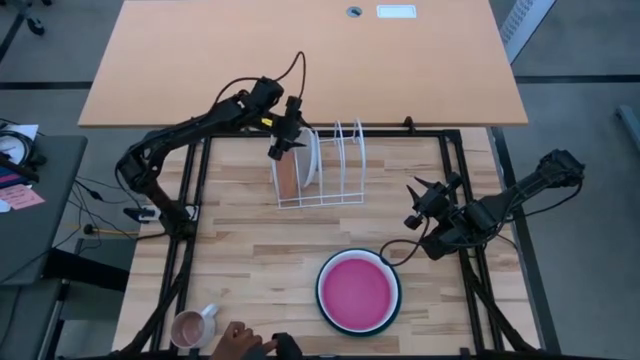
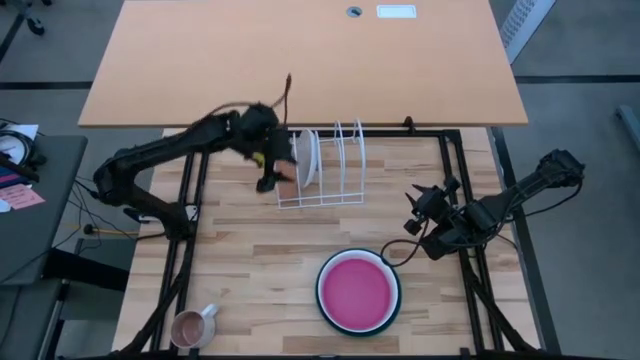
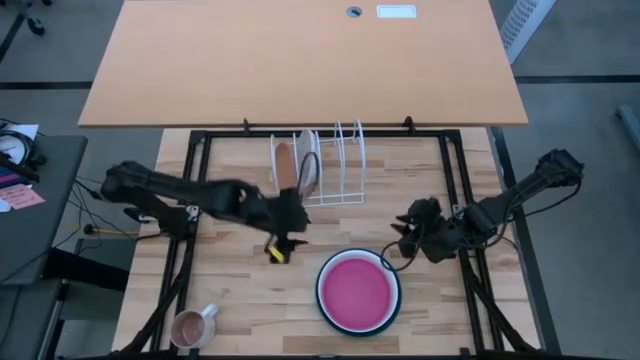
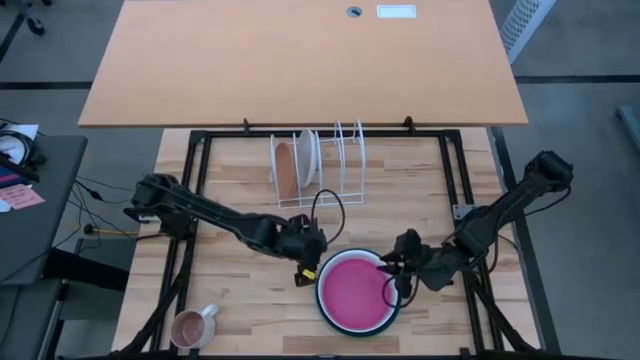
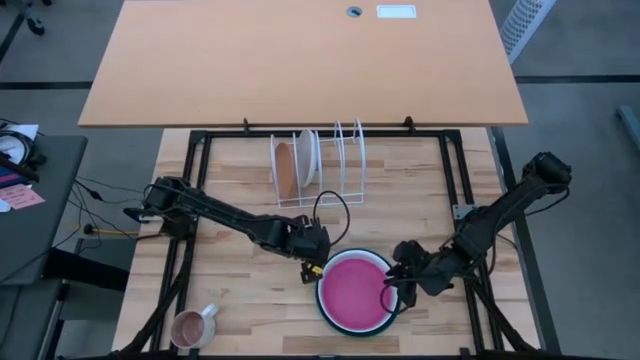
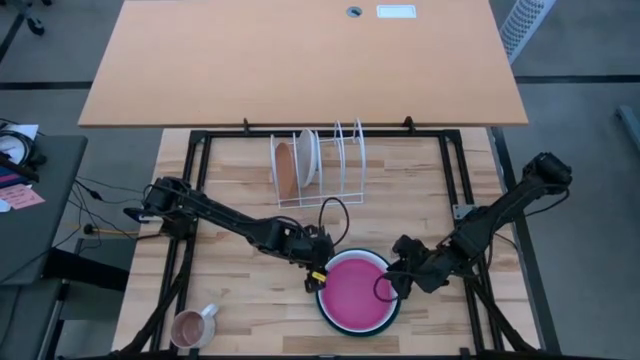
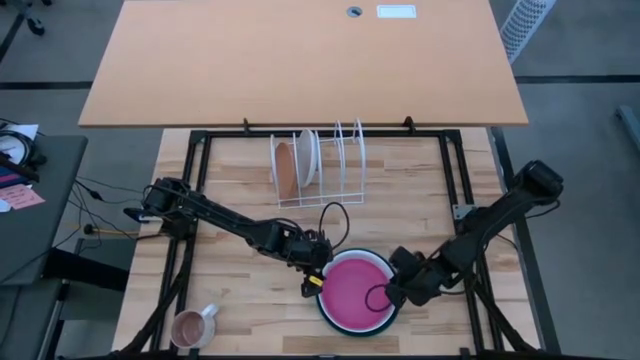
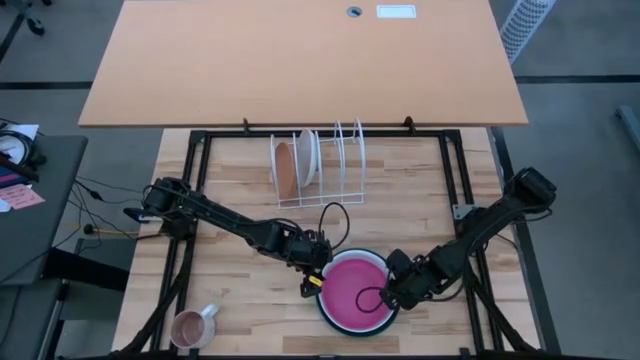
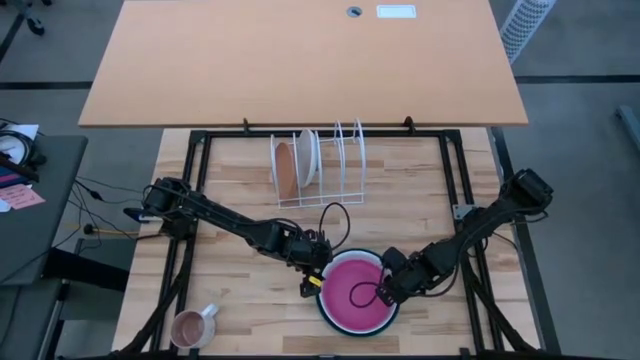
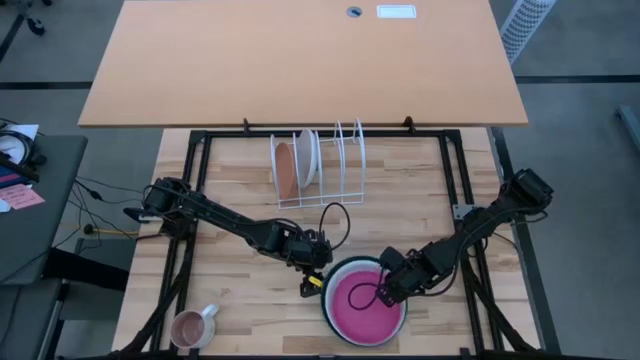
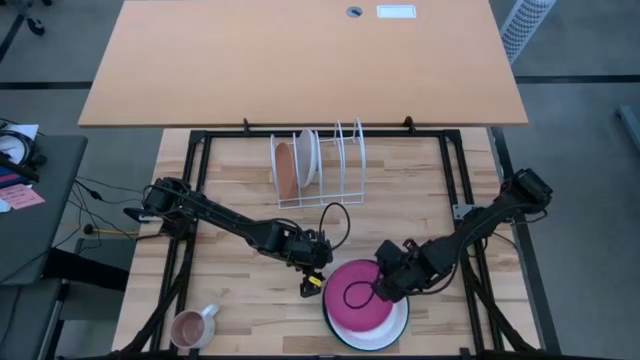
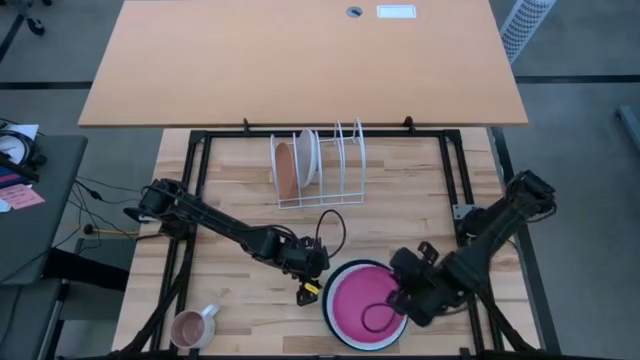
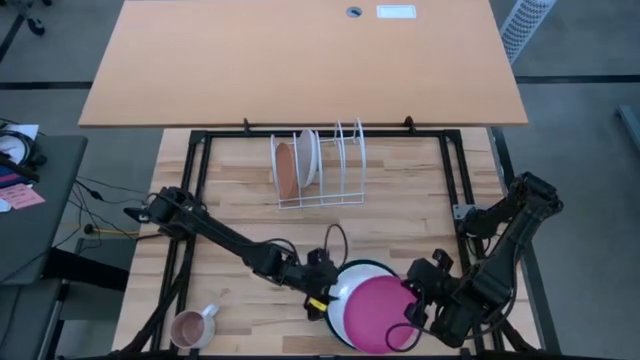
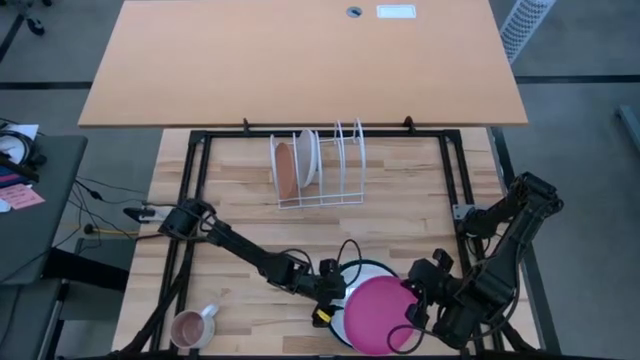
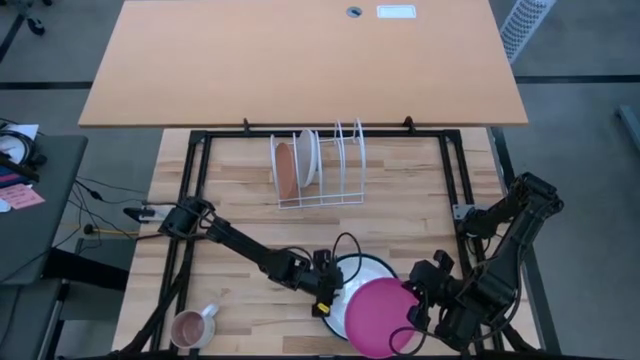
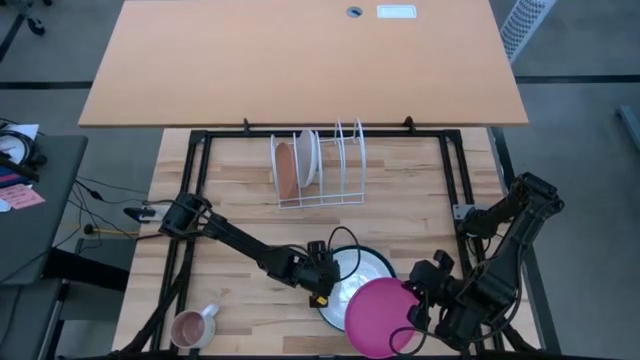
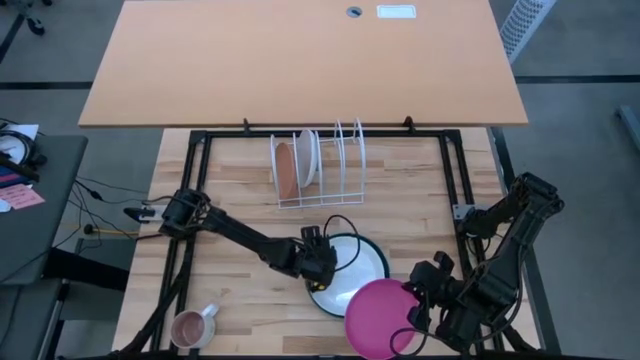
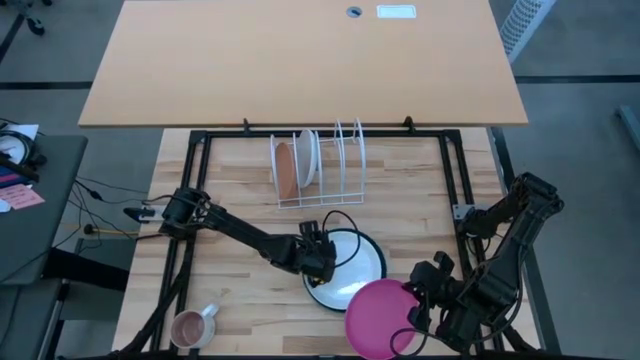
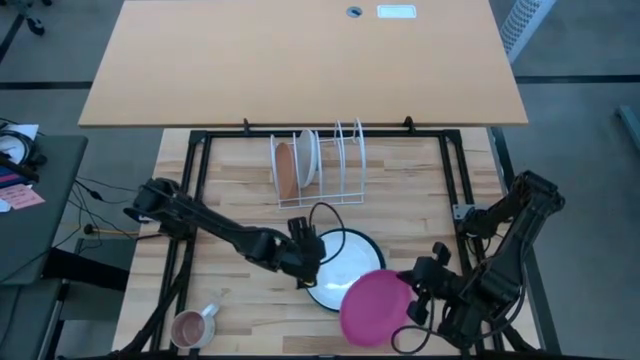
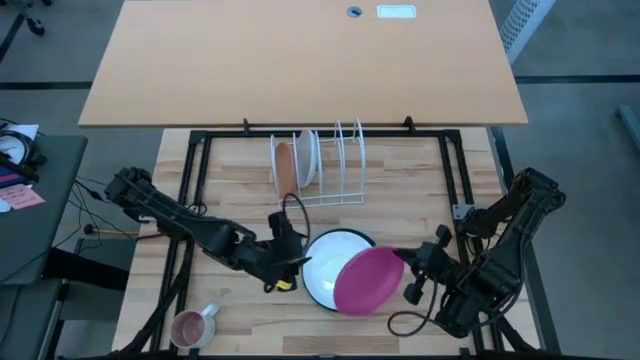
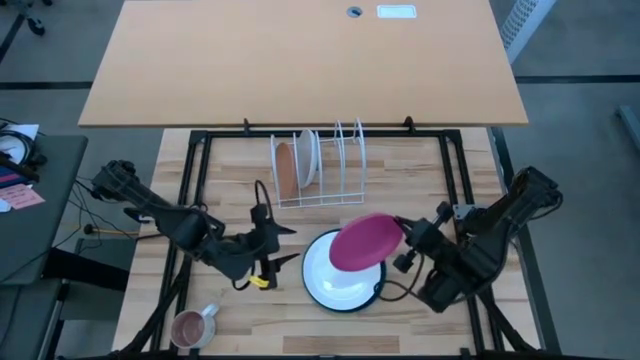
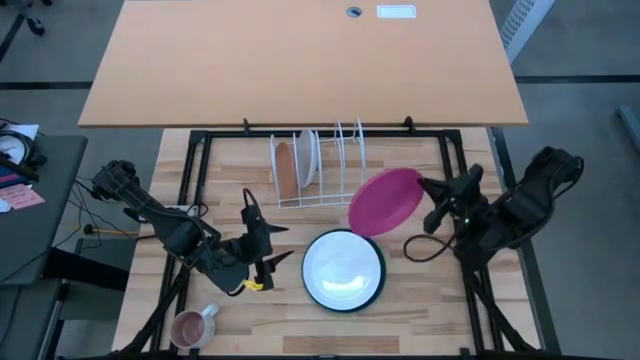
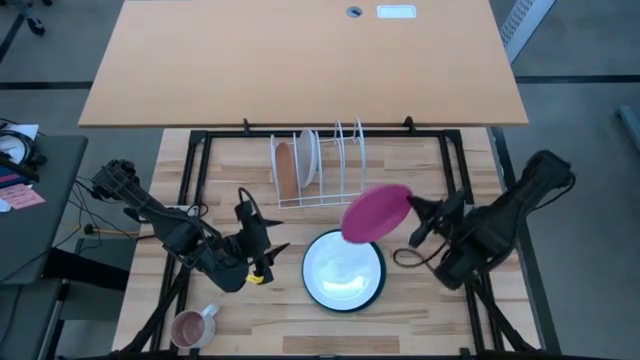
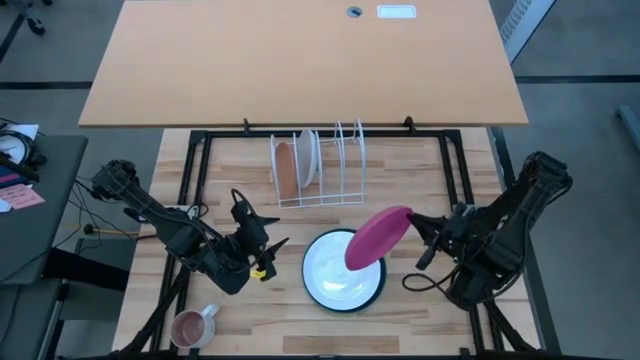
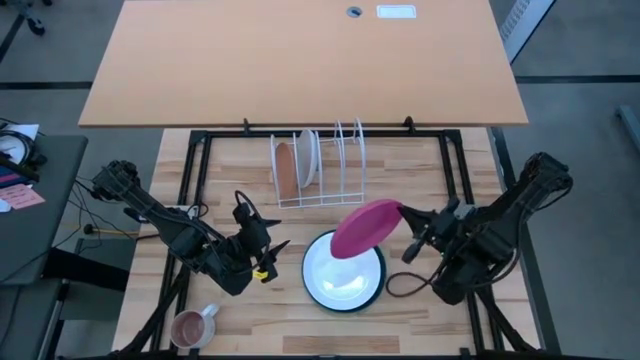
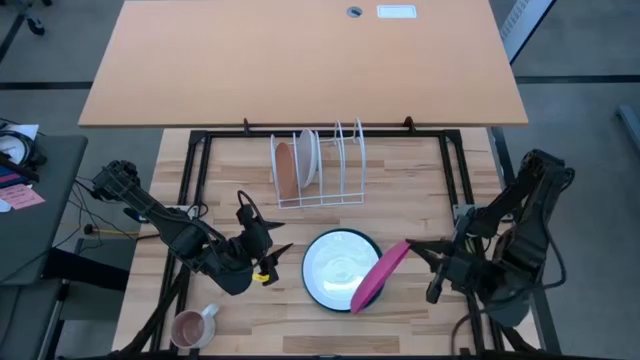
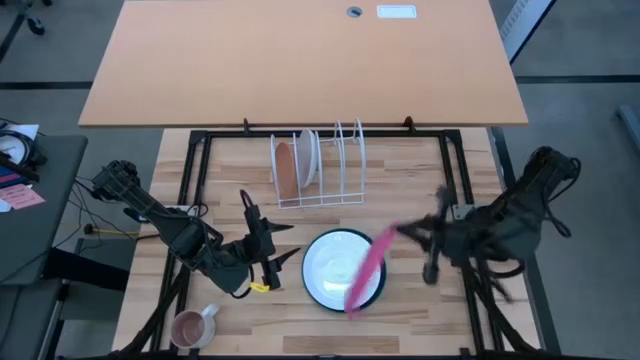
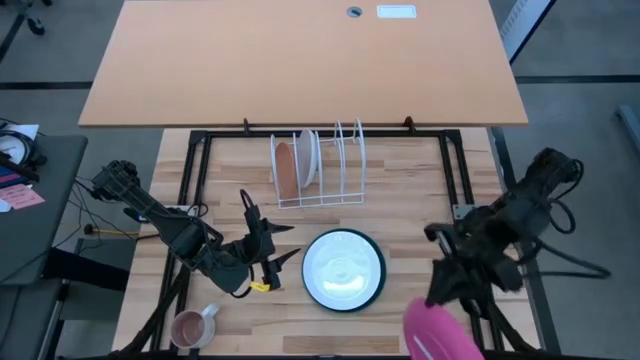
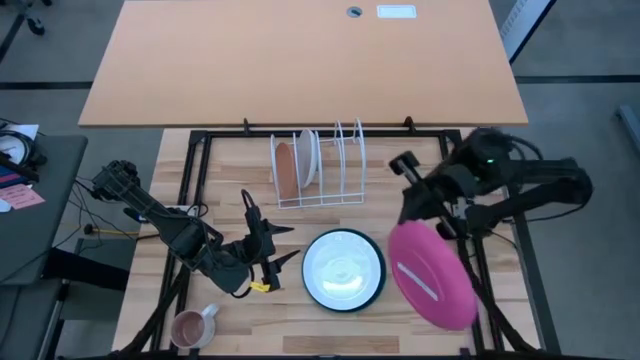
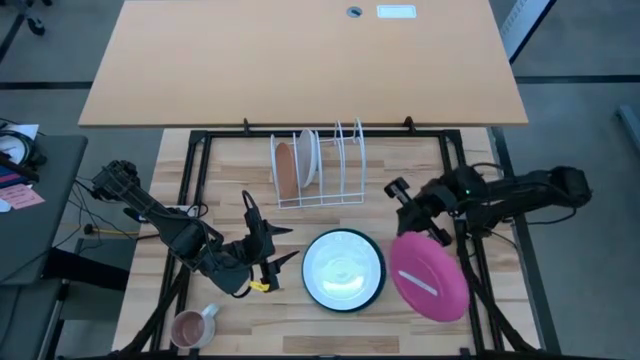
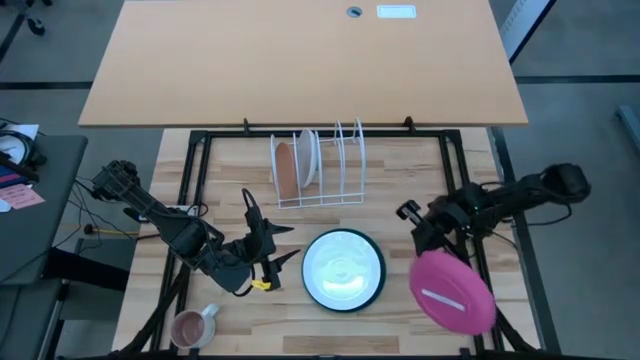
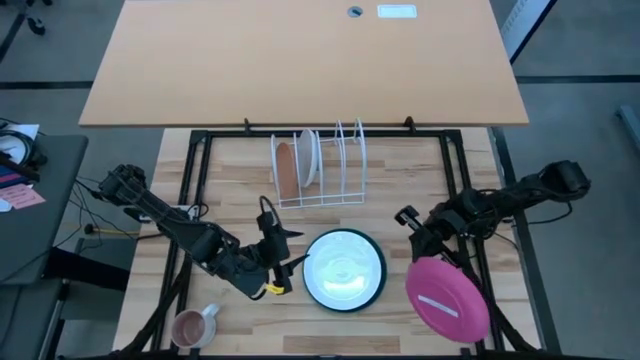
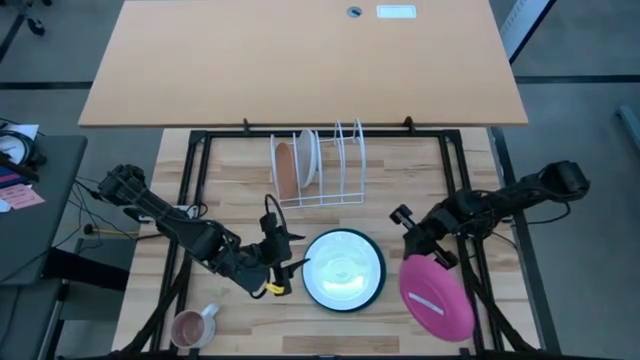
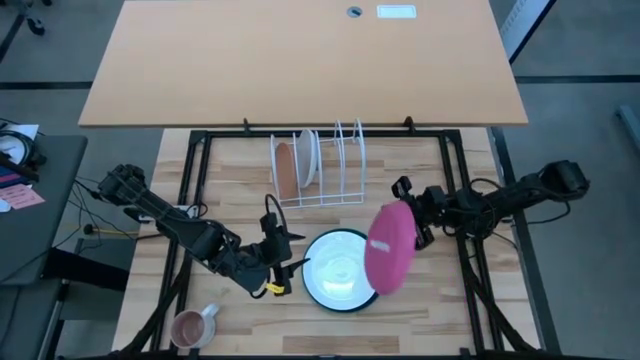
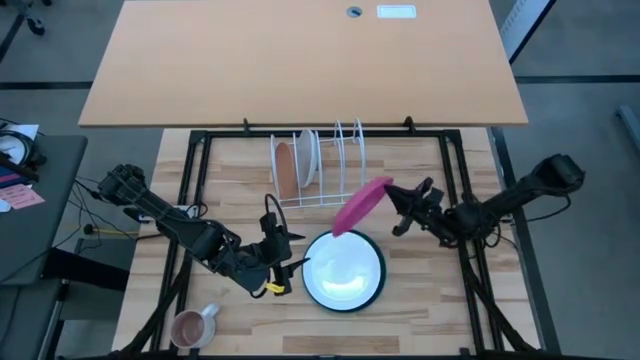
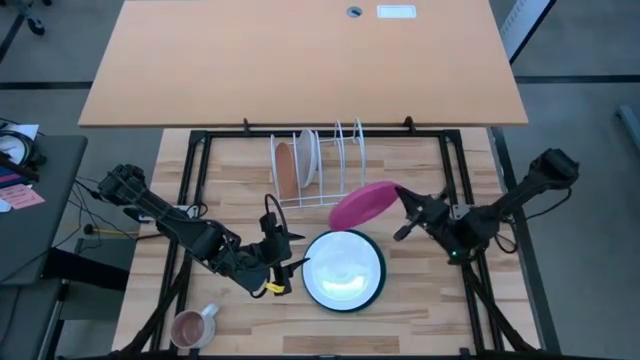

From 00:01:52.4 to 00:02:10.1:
Task: Sort dishes
Put the pink plate in the dish rack

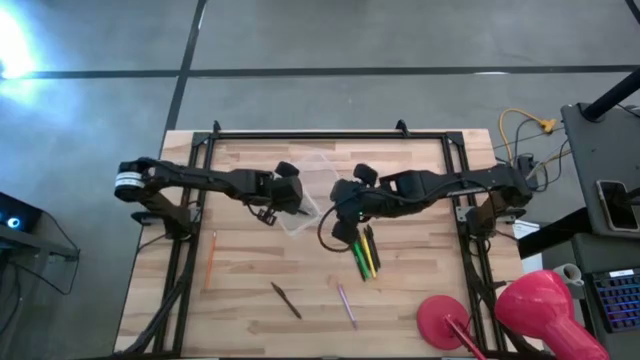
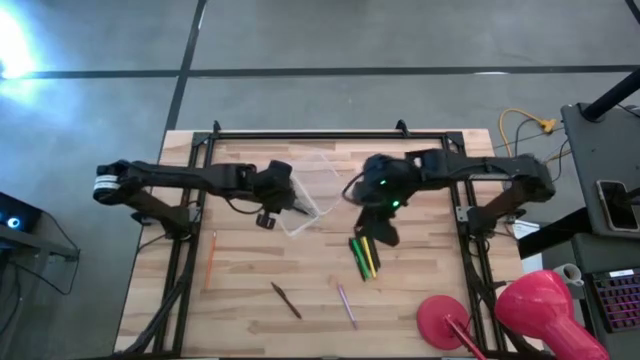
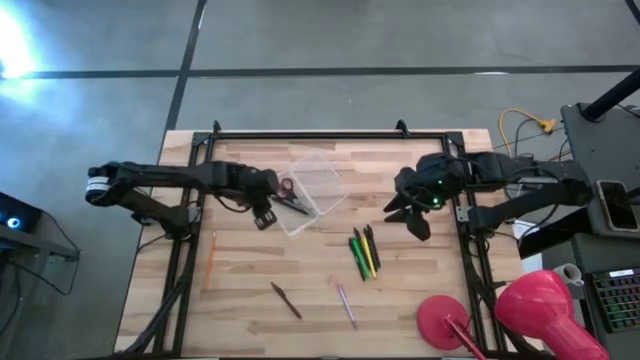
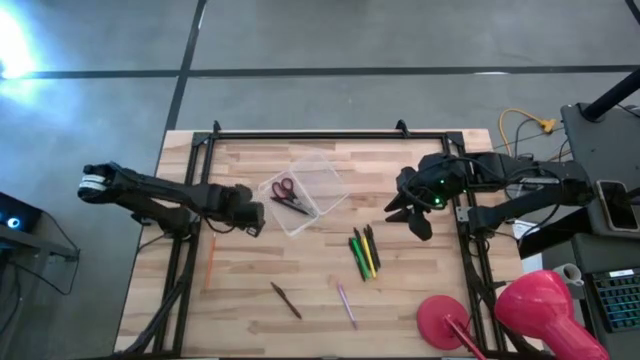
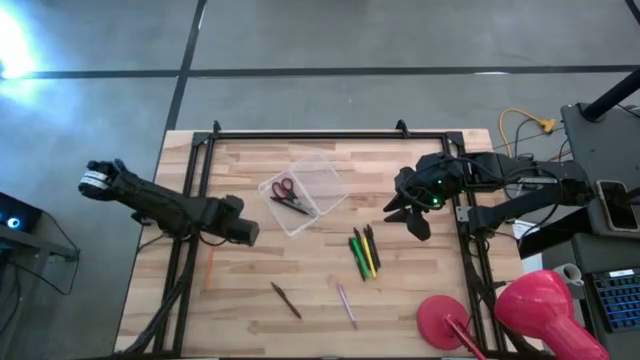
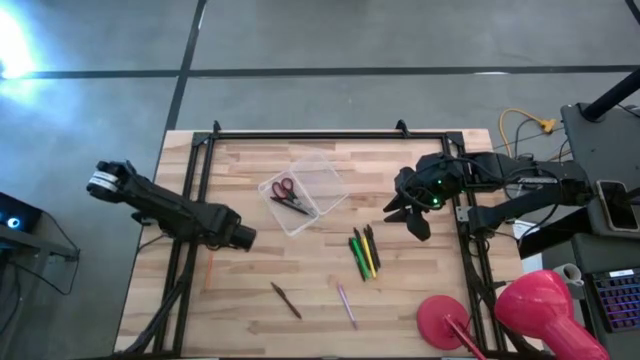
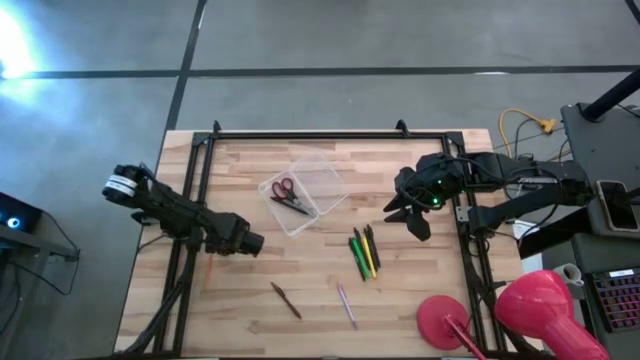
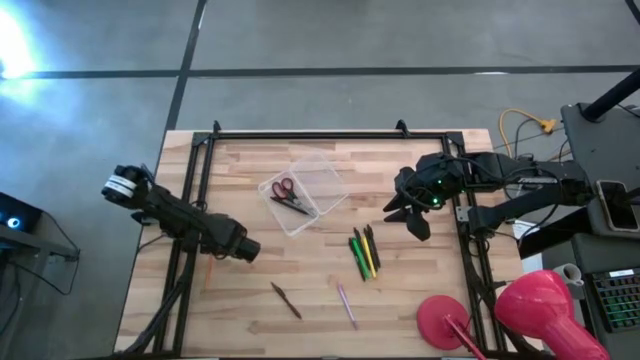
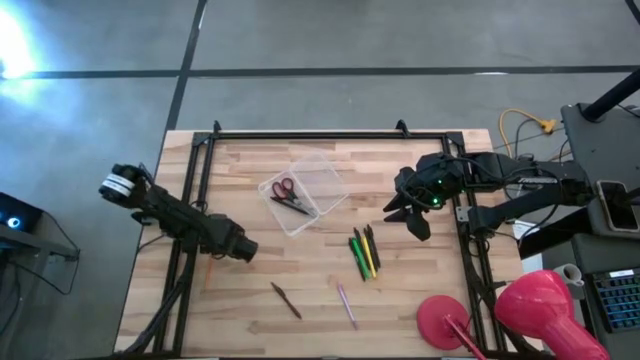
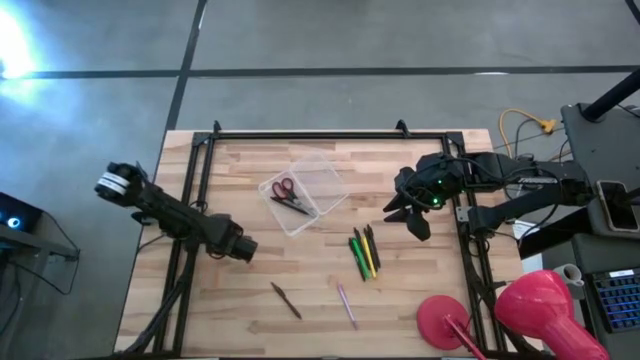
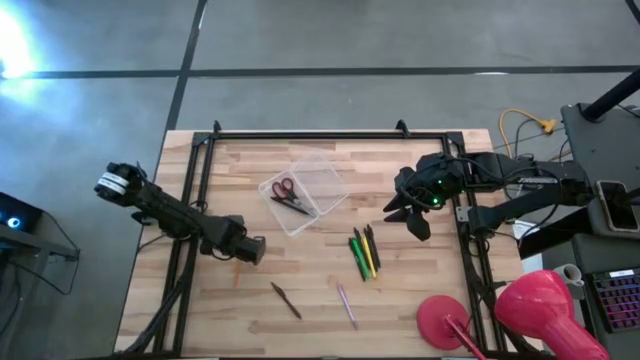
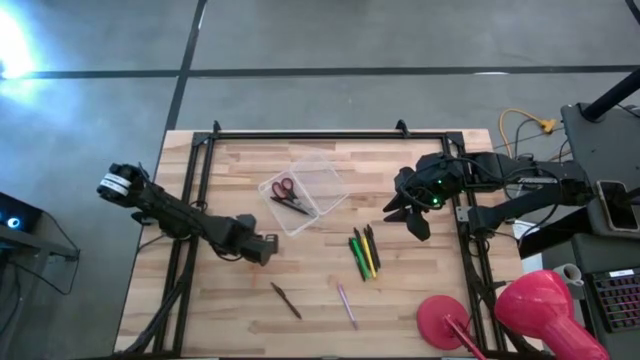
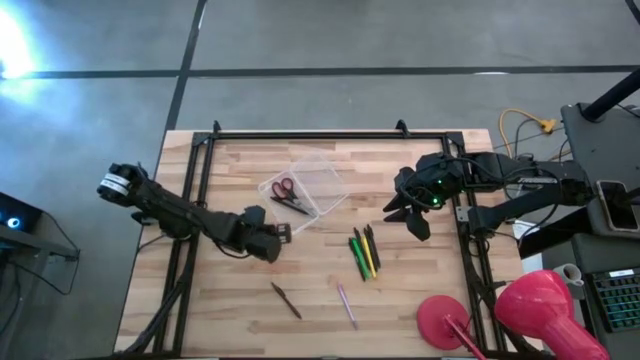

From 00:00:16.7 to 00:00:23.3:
Task: Pick & place school supplies into a supply box
Put the yellow pencil into the transparent supply box
